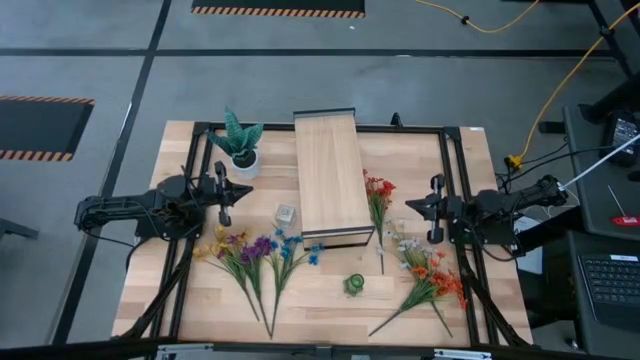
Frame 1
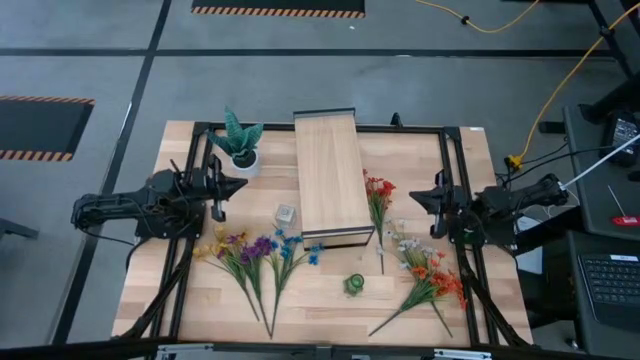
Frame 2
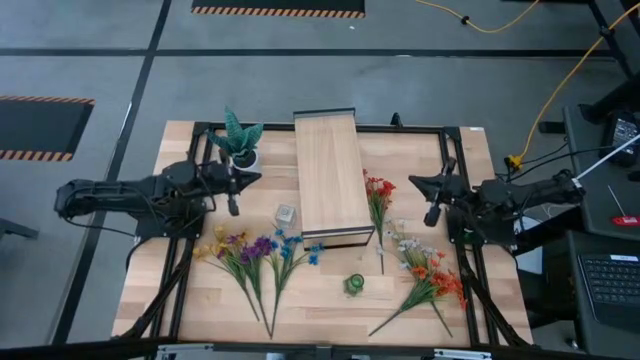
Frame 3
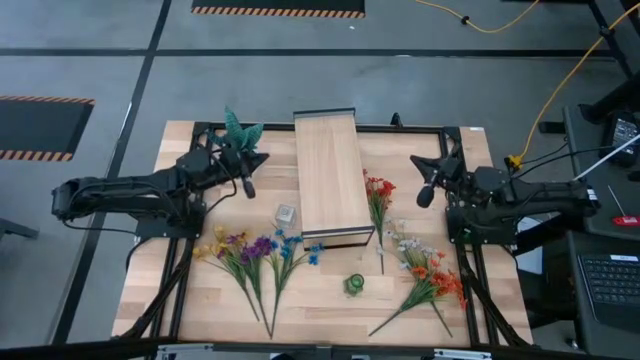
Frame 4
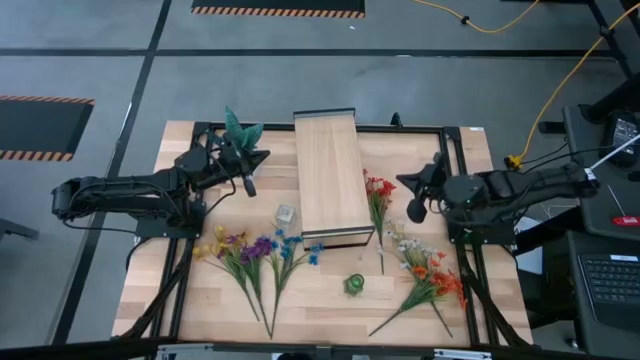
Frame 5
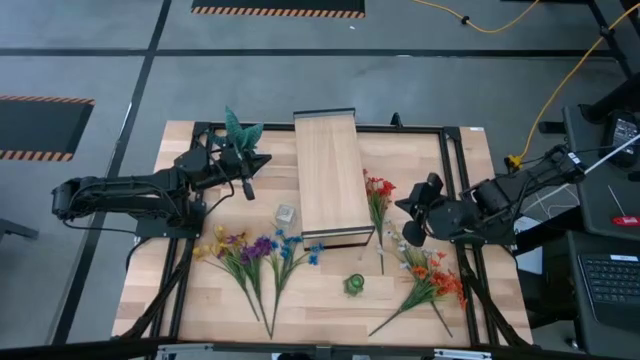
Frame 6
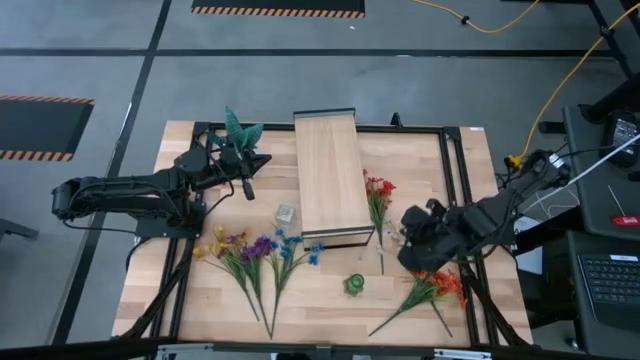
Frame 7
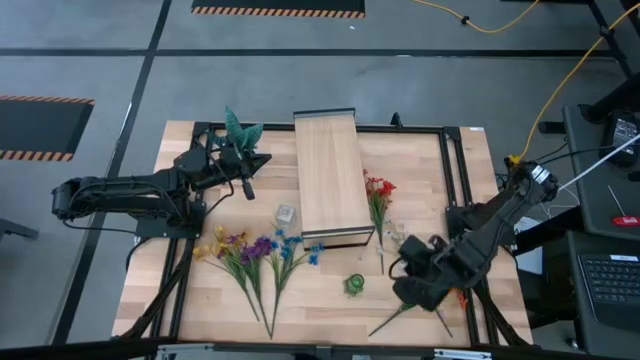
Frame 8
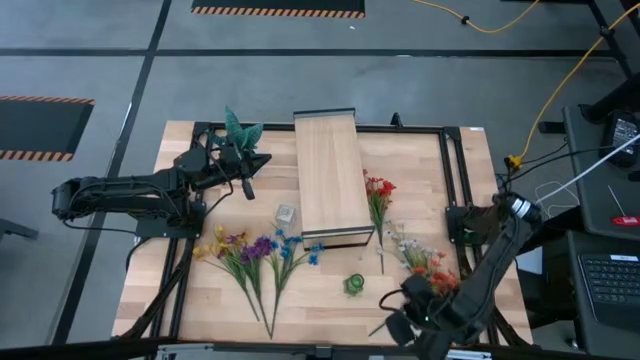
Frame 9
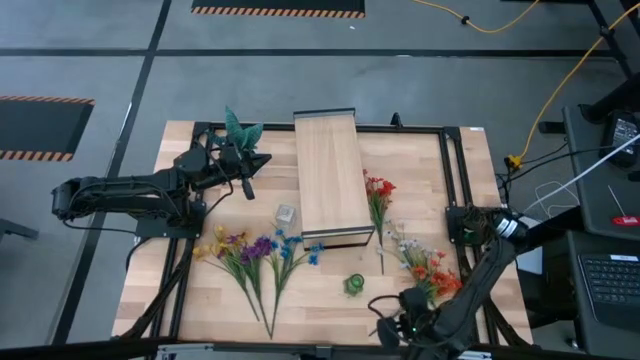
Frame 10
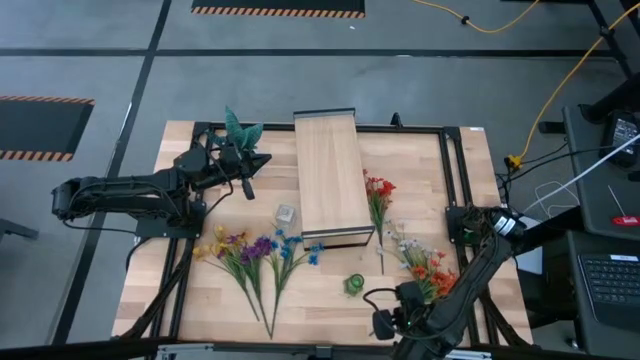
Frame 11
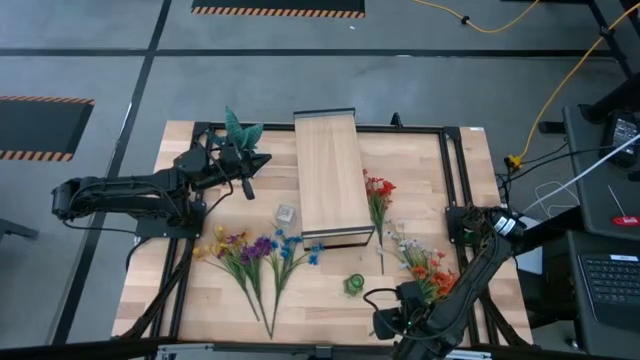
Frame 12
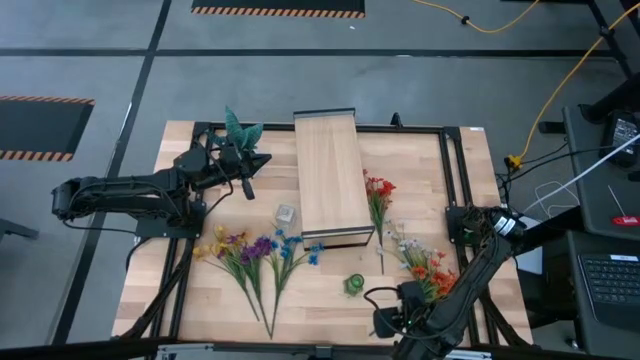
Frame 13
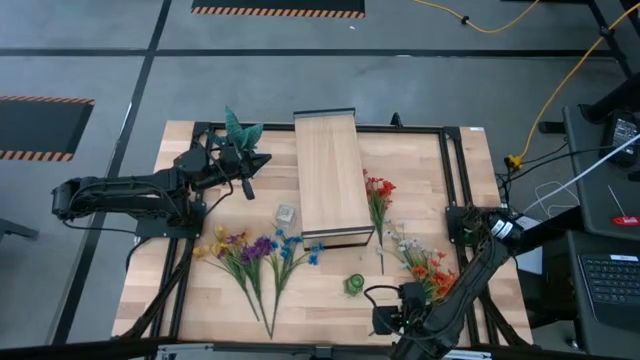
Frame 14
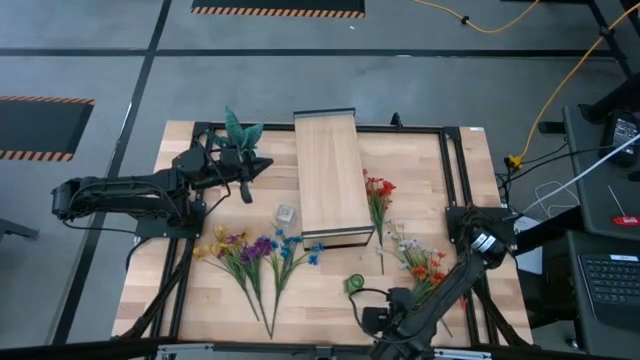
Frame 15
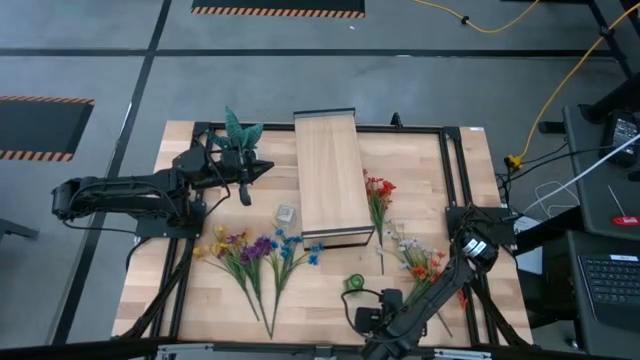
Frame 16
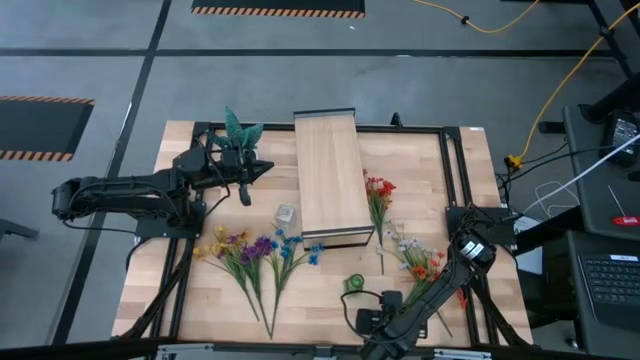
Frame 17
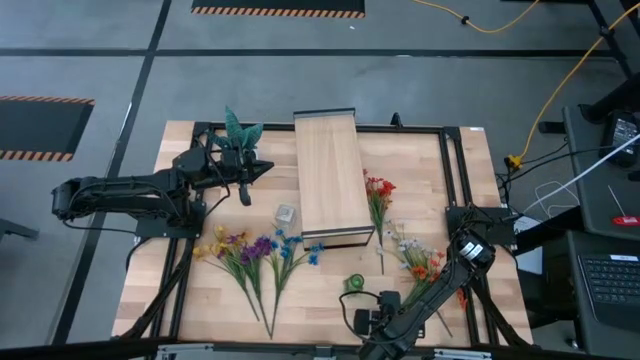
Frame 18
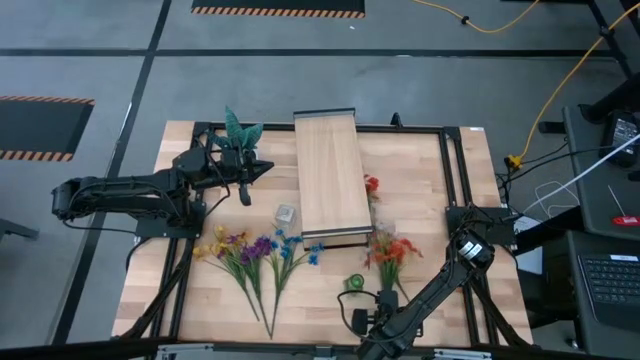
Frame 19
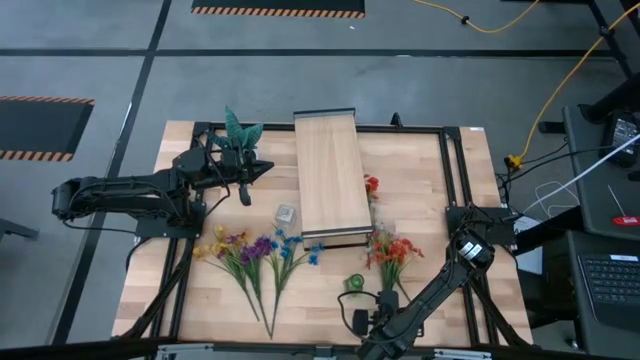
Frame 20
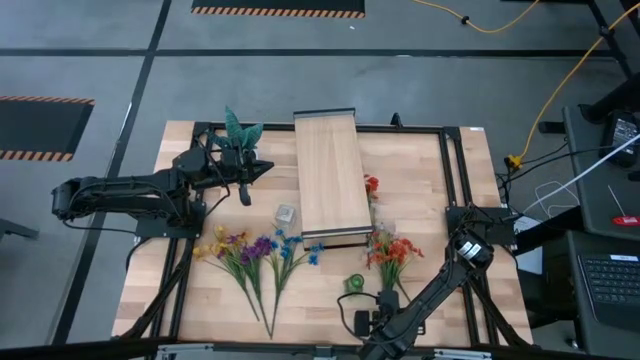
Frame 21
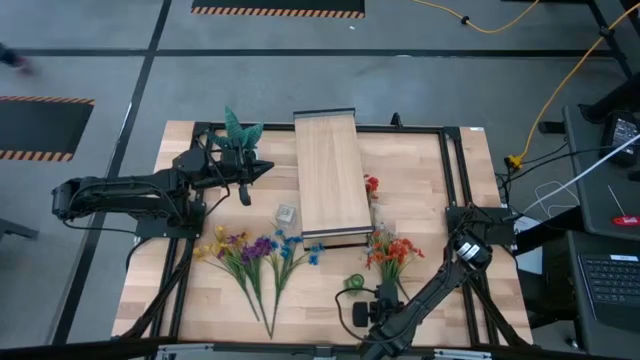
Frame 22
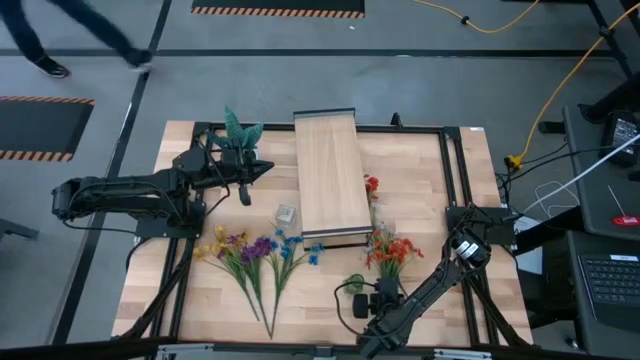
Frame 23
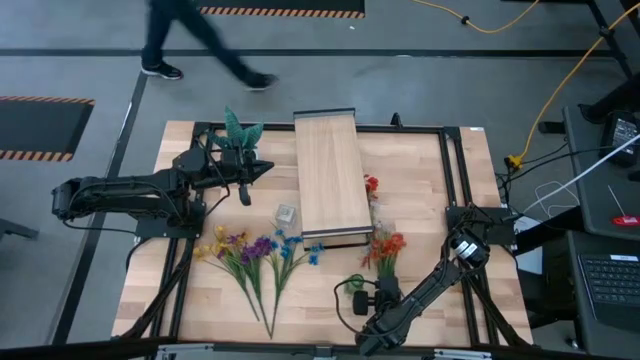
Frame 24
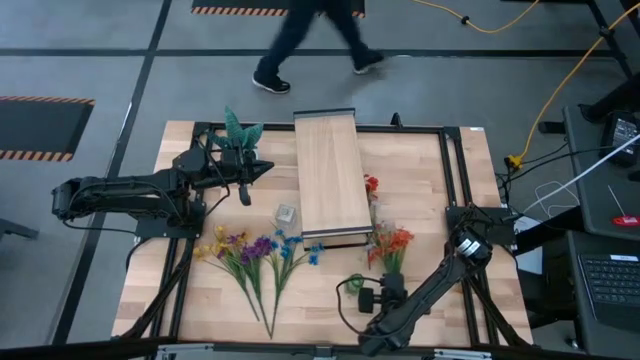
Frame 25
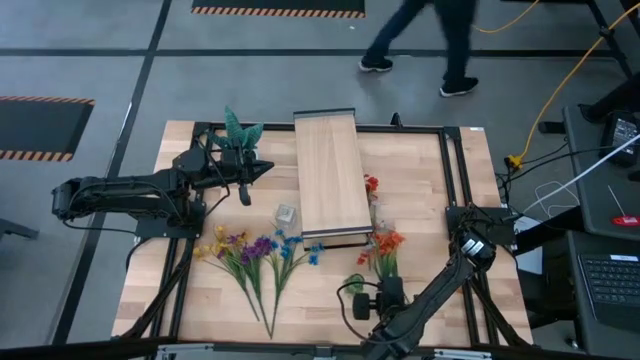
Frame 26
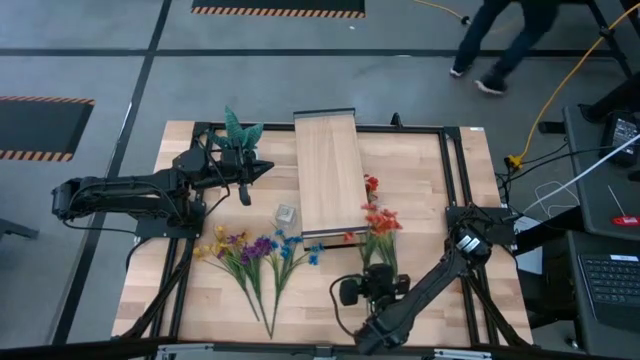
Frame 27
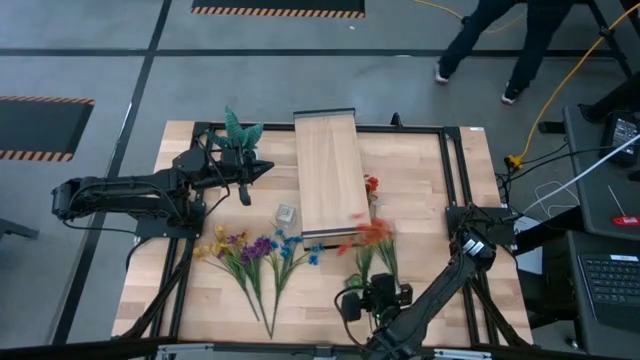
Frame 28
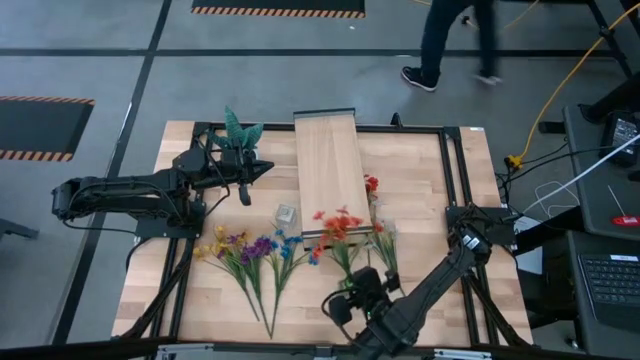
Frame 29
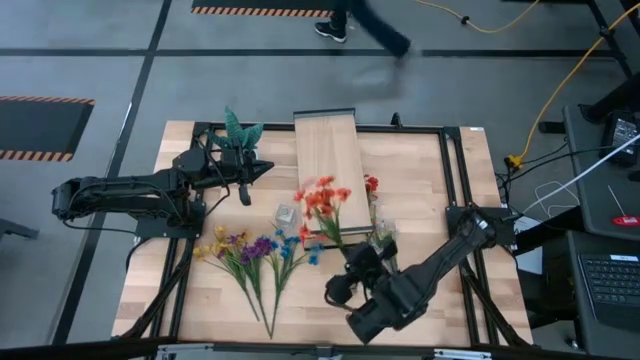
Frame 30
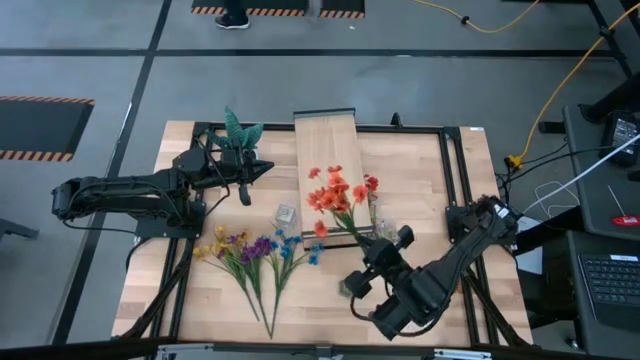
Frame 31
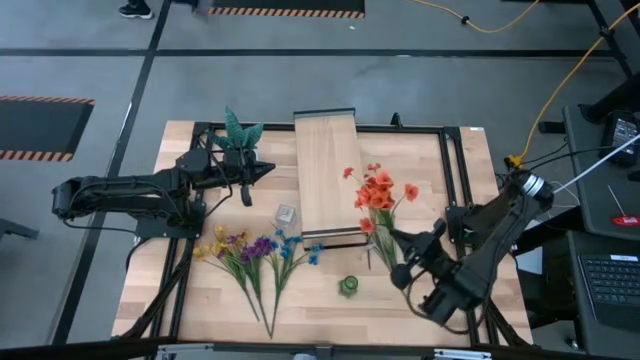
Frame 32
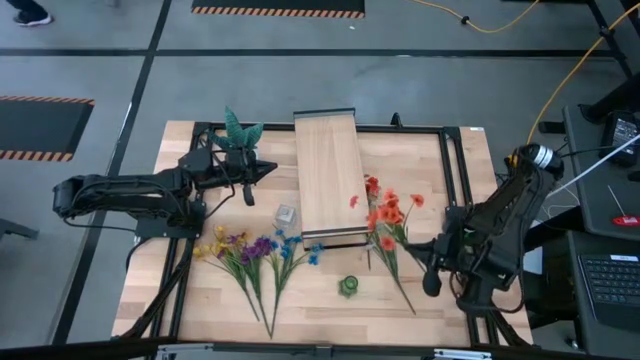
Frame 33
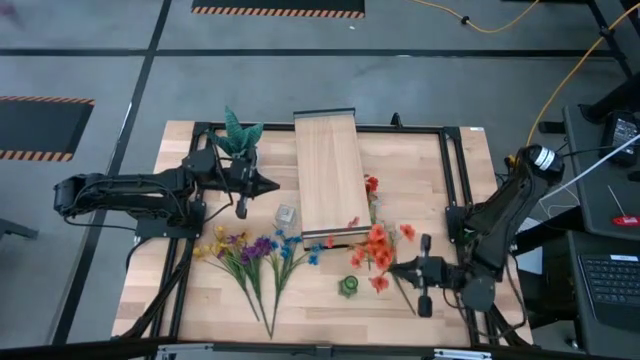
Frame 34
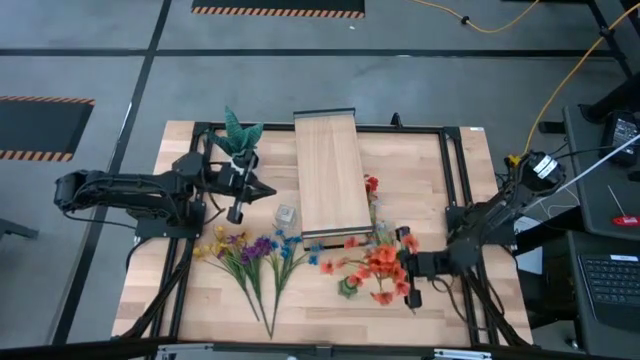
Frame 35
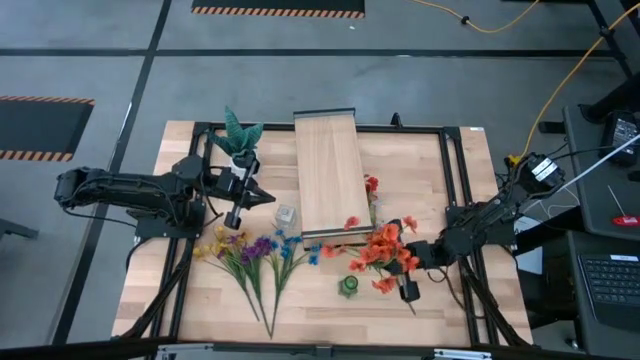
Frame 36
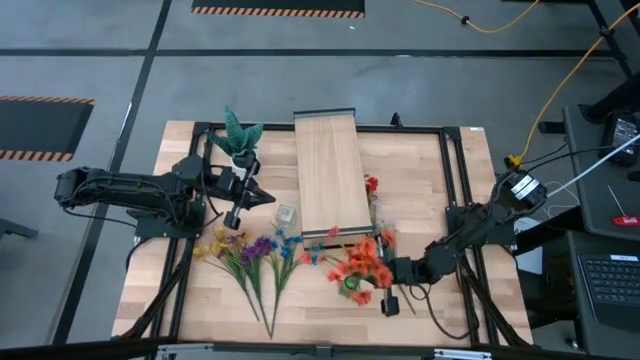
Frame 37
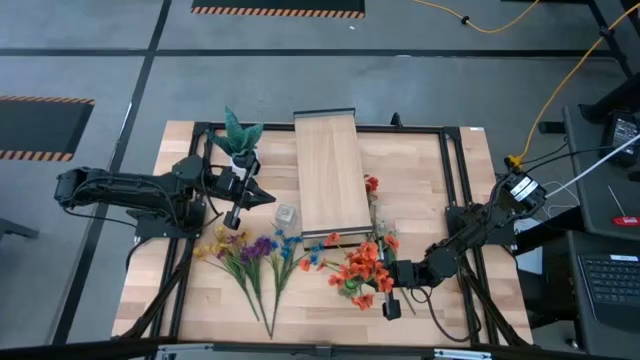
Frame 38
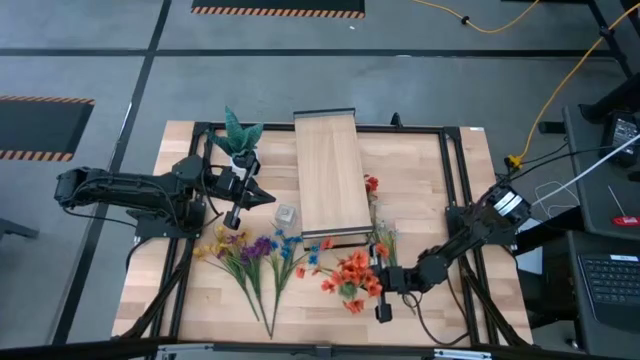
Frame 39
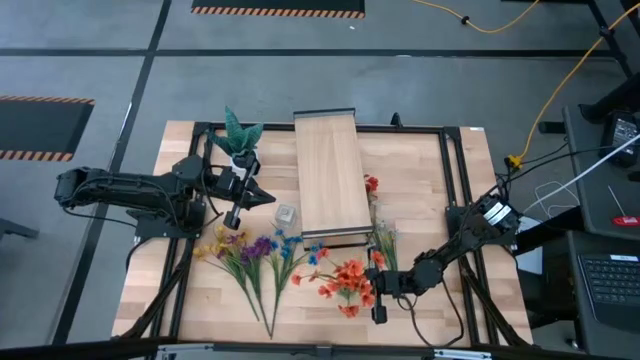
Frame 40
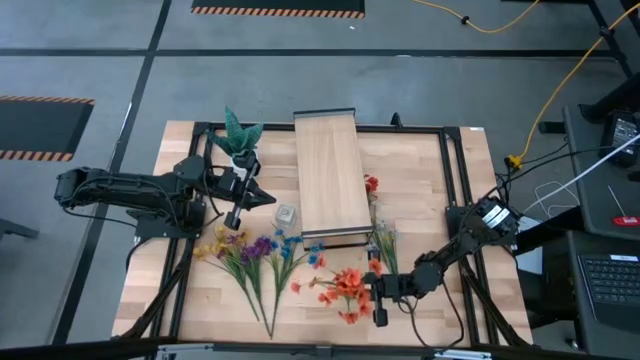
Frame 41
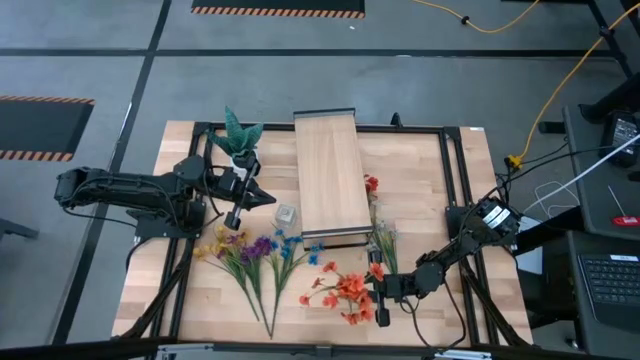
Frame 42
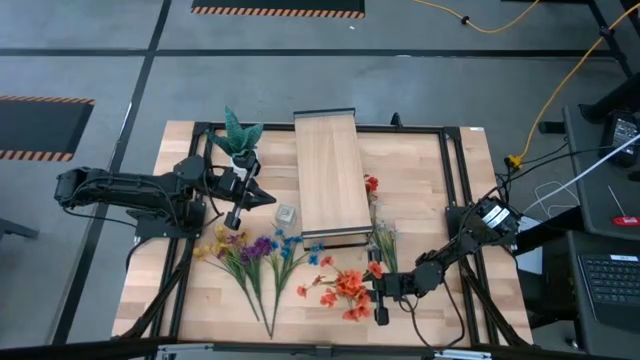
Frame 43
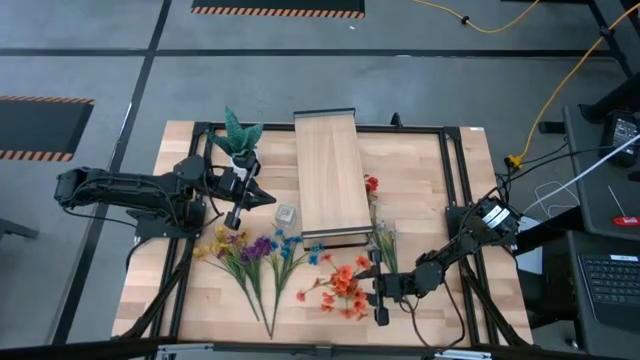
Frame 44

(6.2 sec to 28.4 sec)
Task: Pick and place flowers into a vace then onto a shelf
Put the bottom orange flowers into the green vase
